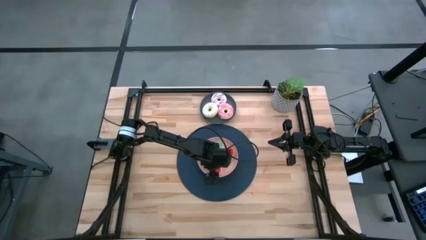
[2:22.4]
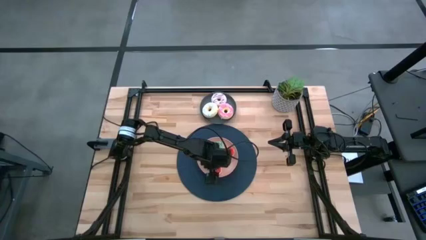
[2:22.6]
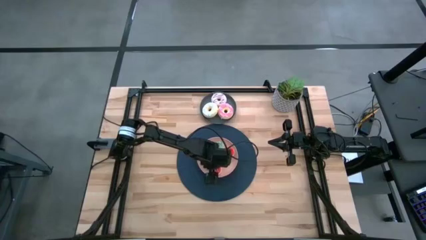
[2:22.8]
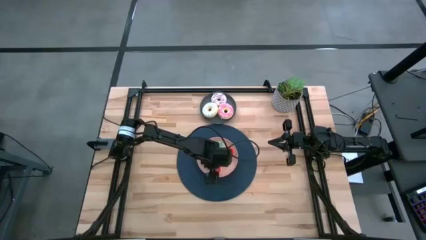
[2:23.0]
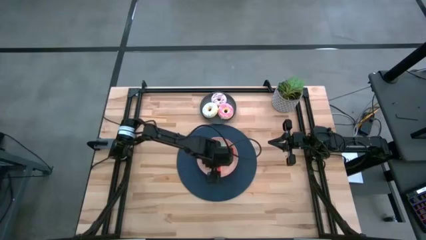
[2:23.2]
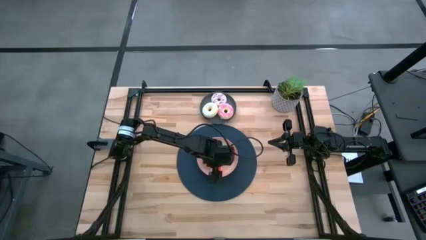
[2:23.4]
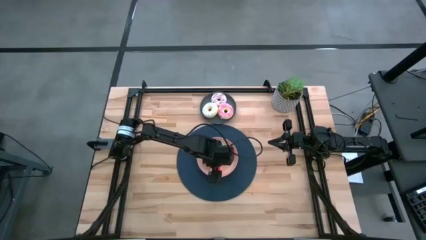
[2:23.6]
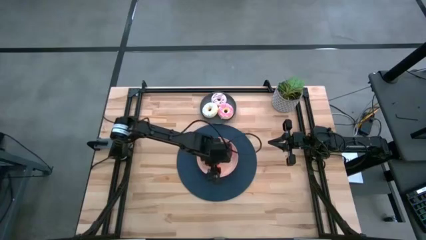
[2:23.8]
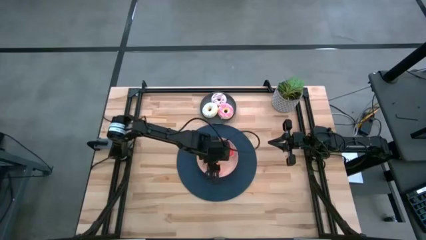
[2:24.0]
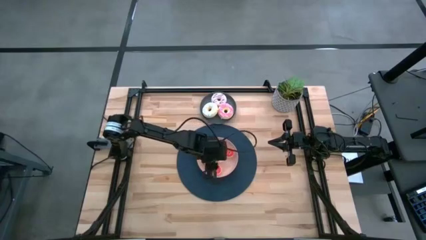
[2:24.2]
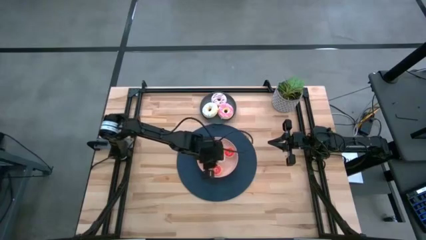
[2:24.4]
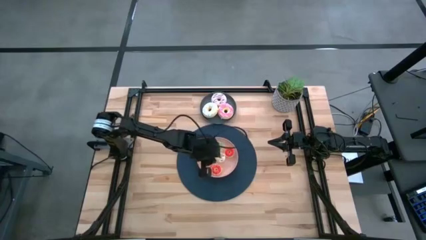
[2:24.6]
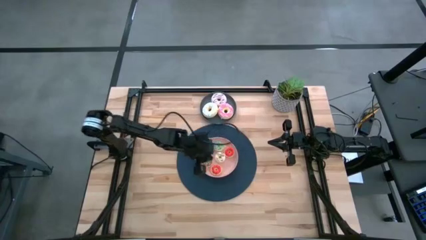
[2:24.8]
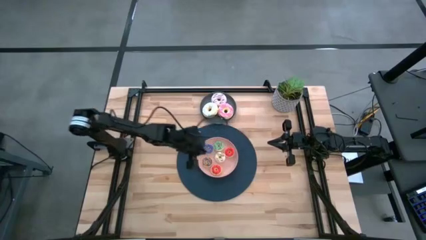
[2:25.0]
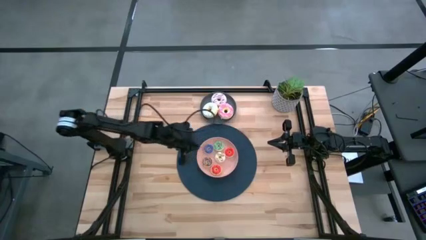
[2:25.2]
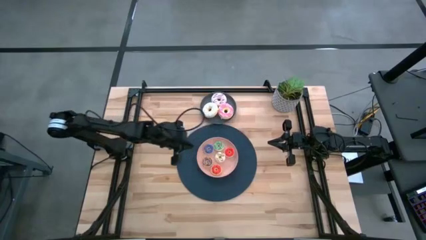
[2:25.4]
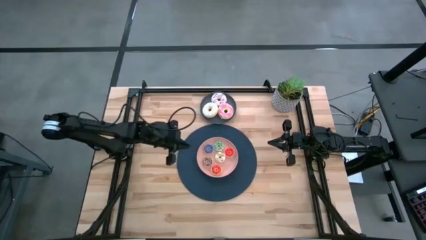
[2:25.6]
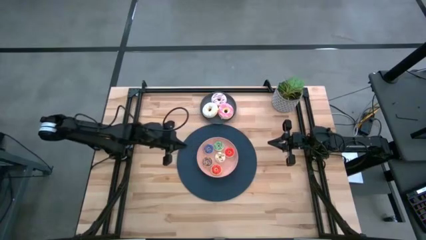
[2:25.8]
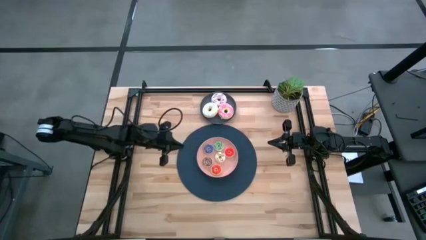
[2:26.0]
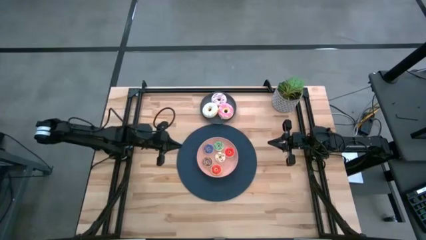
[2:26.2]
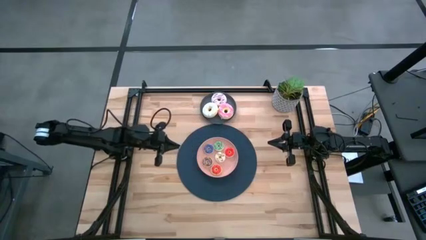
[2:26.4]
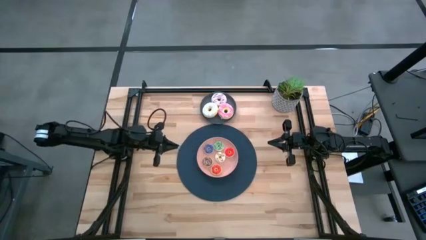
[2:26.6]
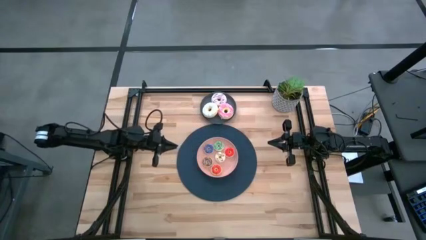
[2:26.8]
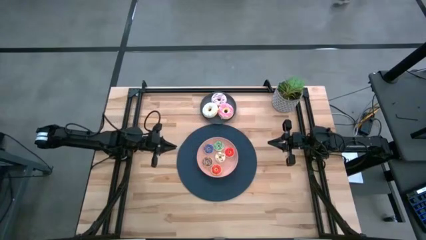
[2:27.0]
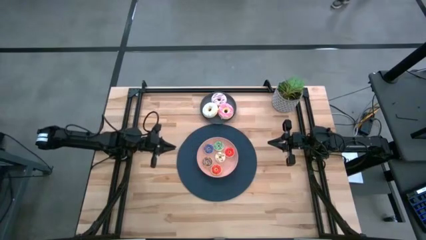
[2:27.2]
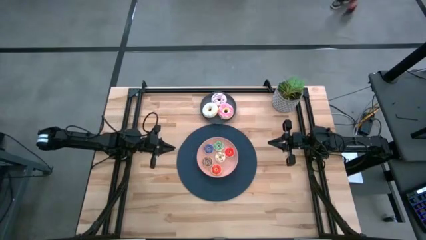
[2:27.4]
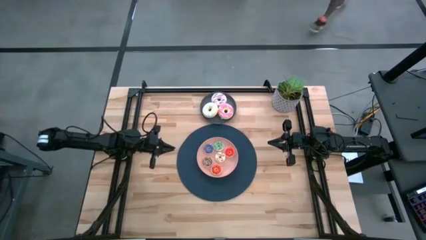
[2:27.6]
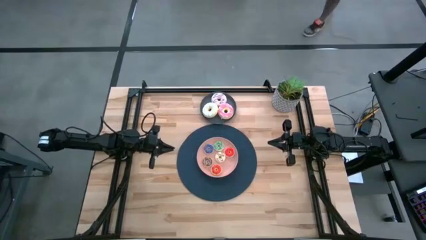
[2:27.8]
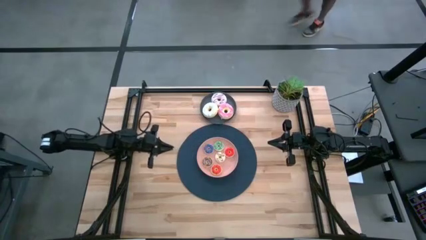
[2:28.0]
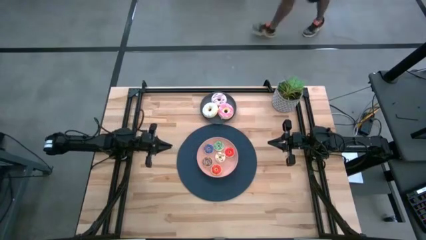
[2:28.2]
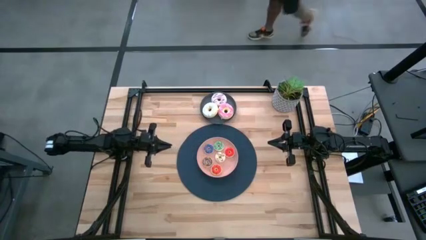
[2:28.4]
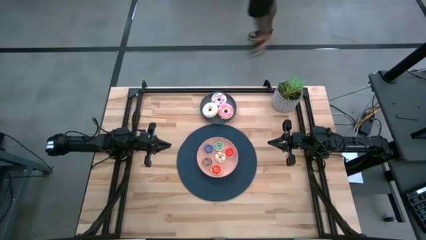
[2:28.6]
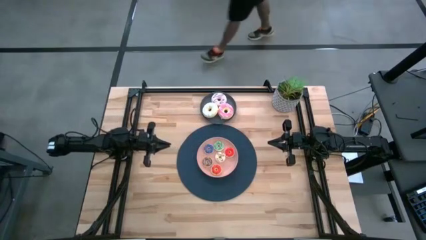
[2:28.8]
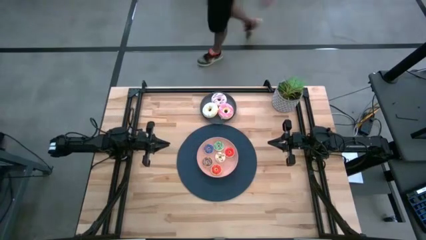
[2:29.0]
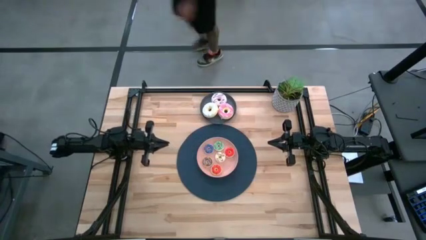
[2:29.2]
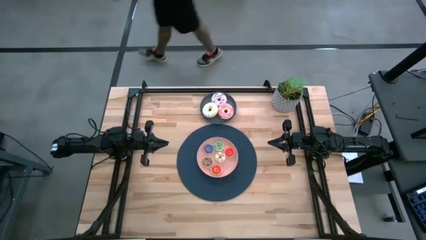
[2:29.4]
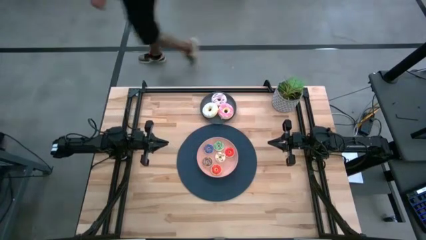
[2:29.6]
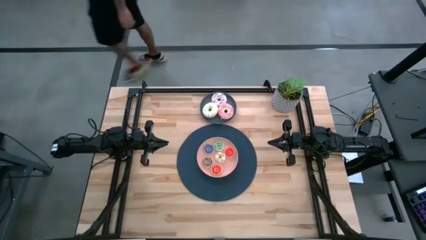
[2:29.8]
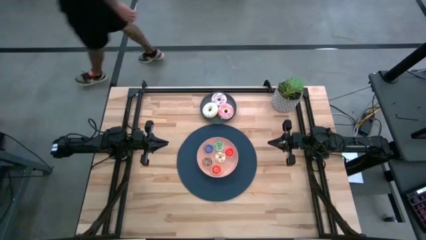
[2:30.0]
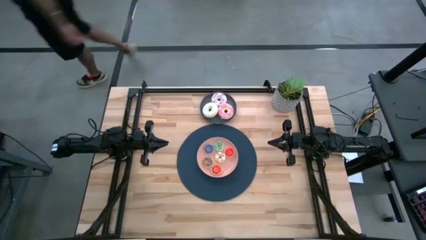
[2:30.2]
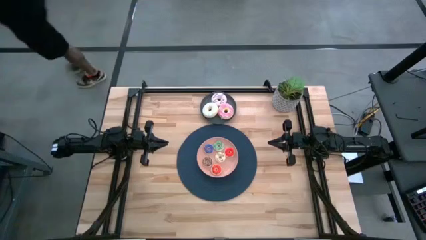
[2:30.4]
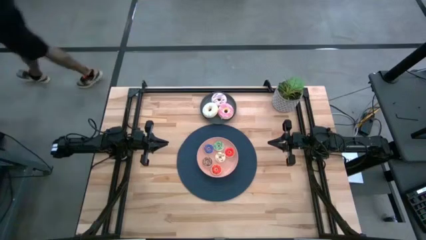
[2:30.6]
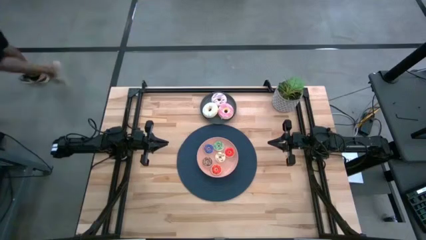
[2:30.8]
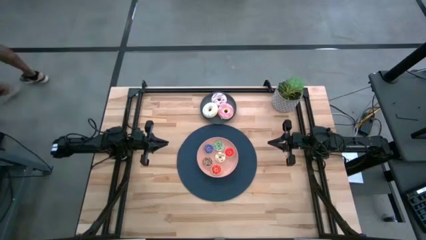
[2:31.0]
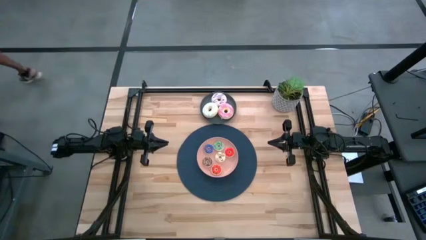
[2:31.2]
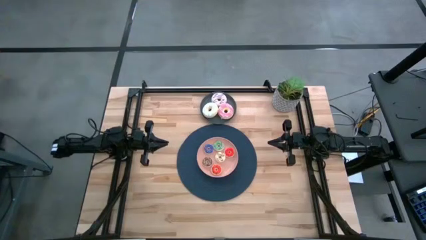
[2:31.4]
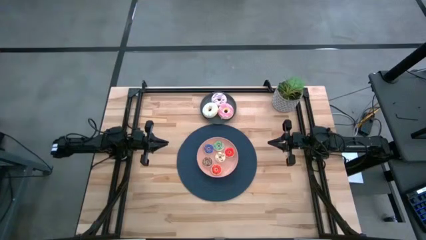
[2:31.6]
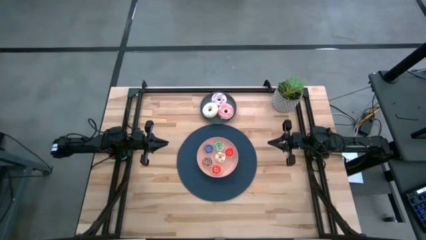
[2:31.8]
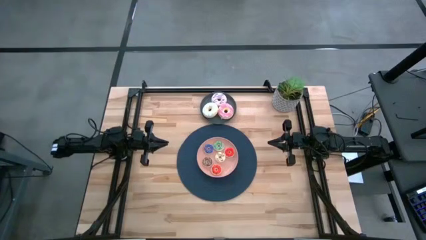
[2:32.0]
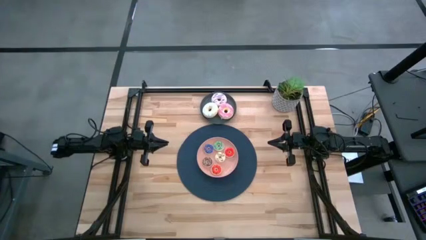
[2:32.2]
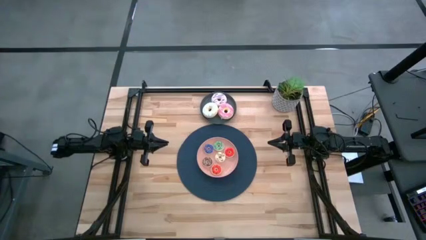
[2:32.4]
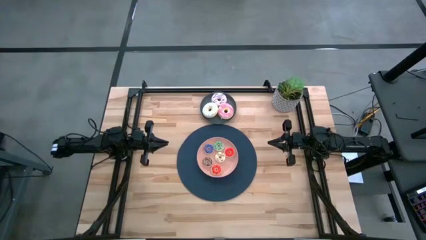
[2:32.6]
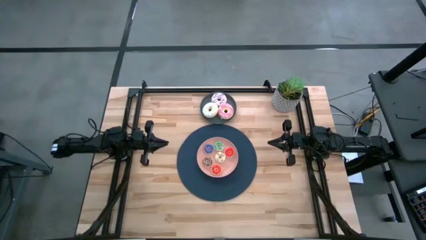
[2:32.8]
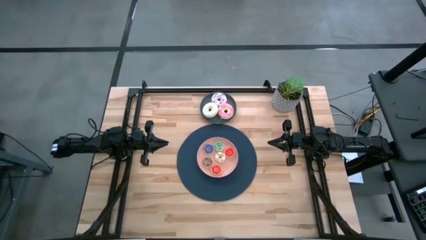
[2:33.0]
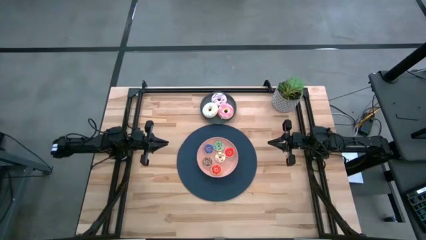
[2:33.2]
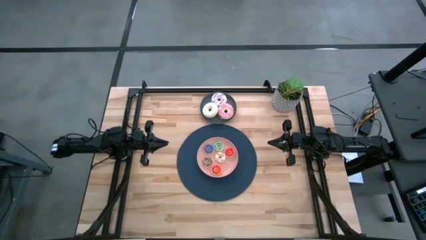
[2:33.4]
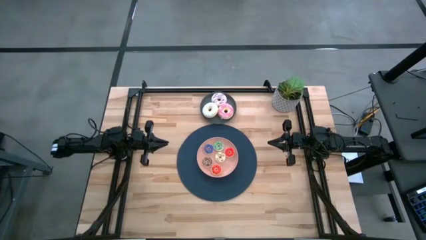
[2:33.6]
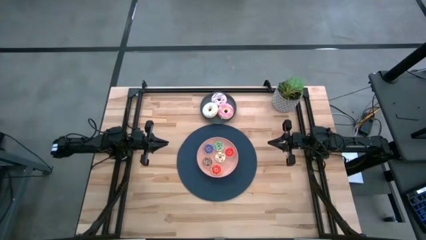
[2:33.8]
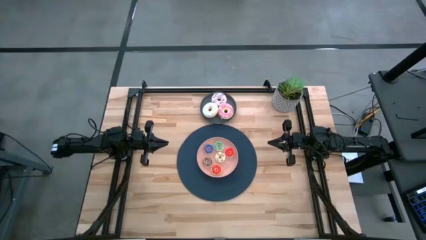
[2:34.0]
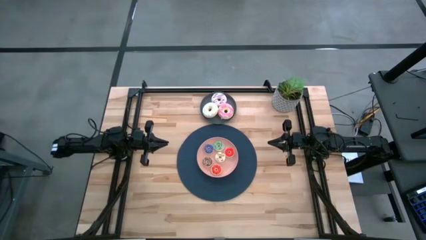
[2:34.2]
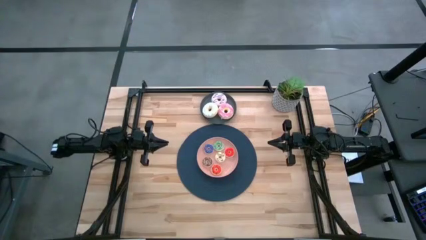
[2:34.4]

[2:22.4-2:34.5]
Task: Pick & Place donuts
Return to Home Position

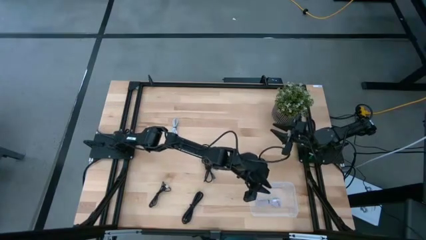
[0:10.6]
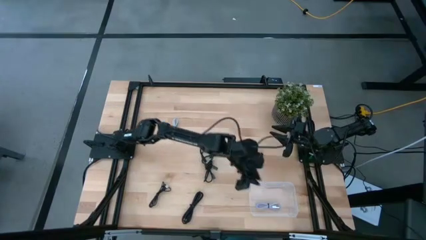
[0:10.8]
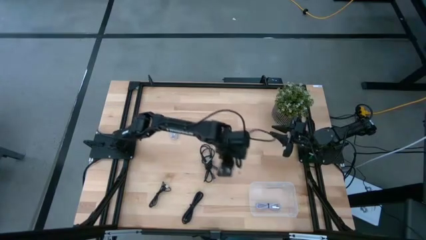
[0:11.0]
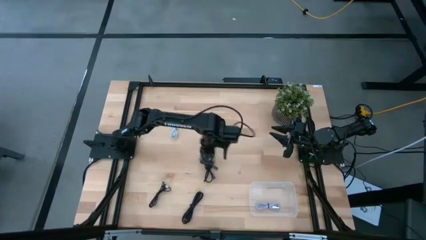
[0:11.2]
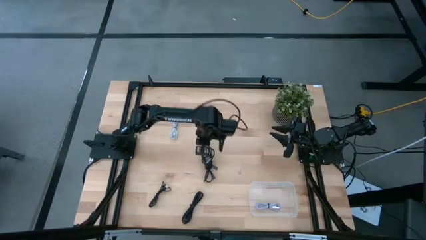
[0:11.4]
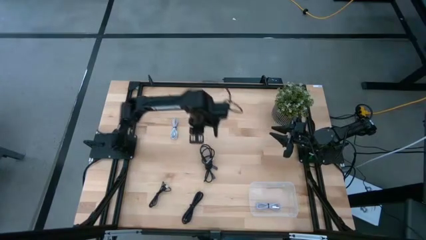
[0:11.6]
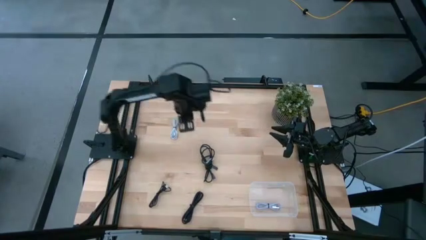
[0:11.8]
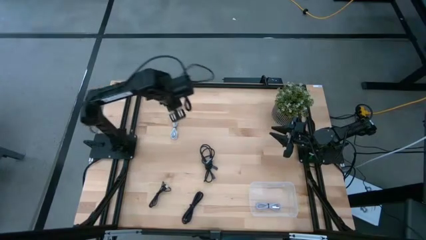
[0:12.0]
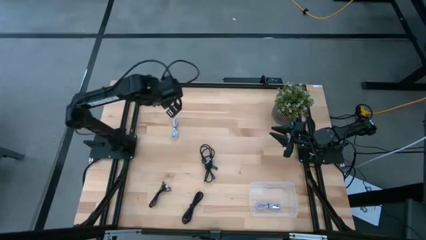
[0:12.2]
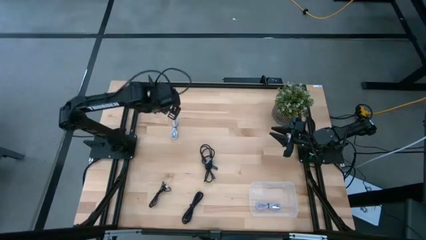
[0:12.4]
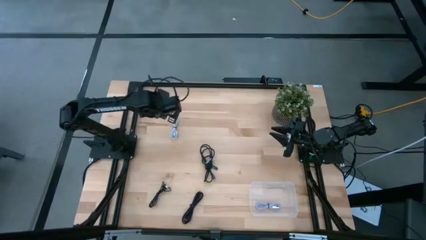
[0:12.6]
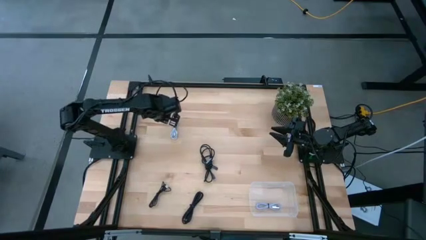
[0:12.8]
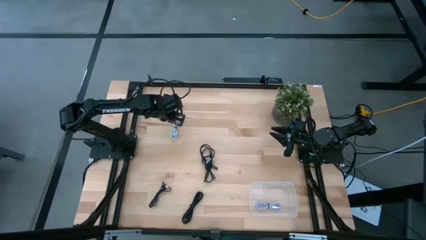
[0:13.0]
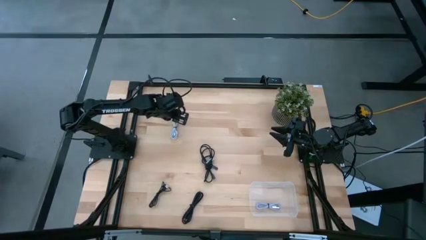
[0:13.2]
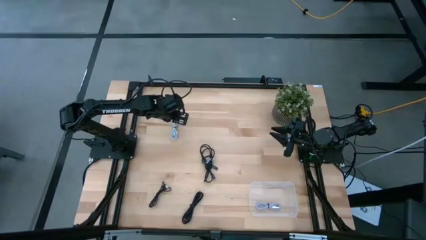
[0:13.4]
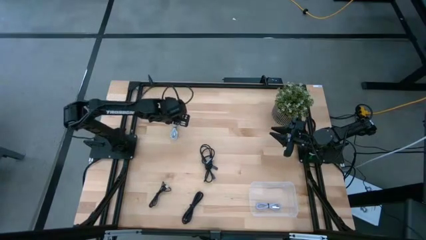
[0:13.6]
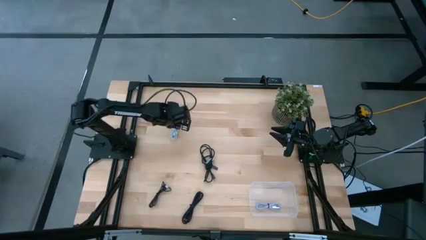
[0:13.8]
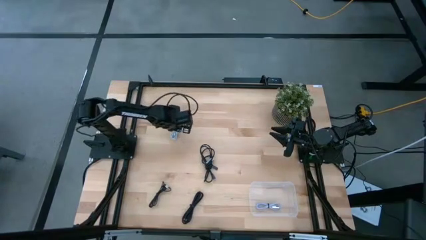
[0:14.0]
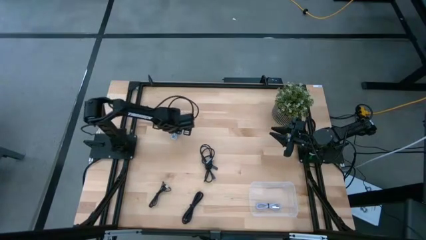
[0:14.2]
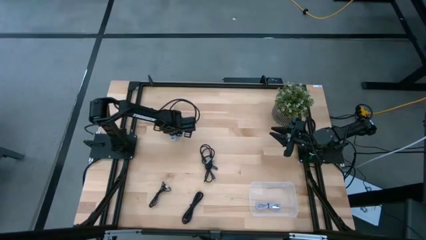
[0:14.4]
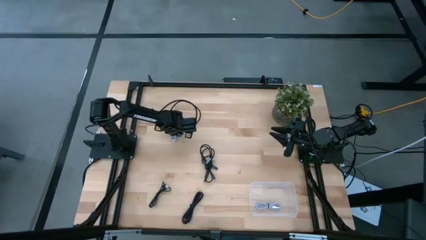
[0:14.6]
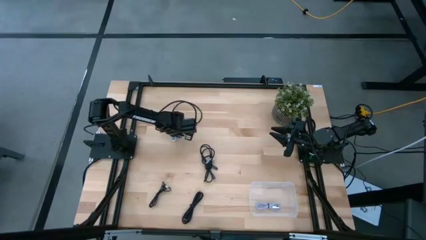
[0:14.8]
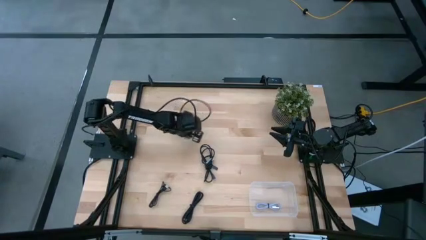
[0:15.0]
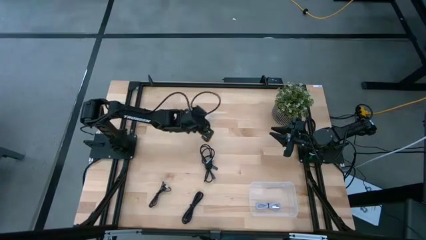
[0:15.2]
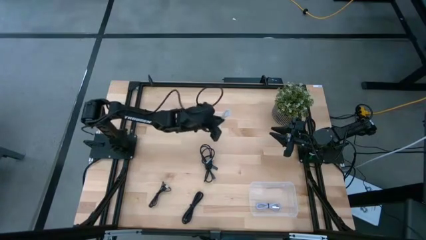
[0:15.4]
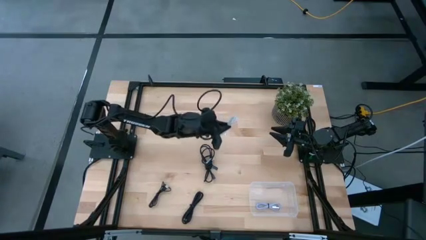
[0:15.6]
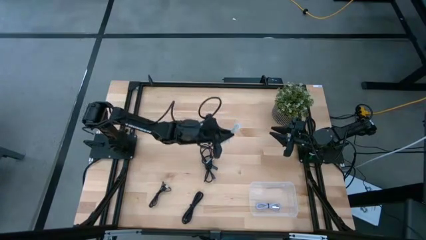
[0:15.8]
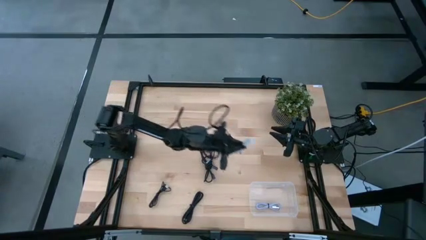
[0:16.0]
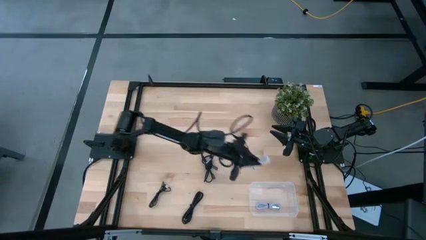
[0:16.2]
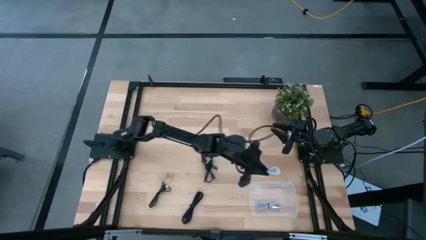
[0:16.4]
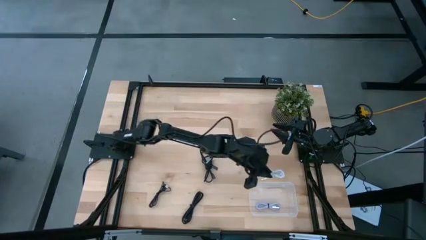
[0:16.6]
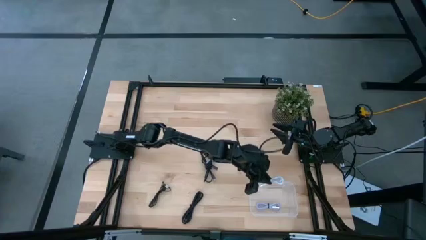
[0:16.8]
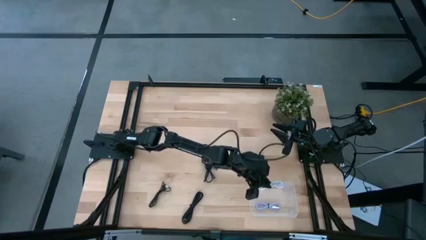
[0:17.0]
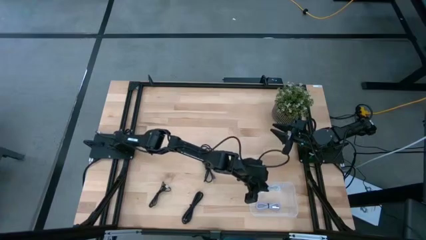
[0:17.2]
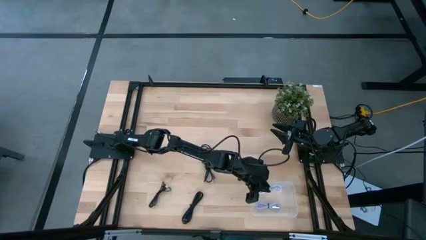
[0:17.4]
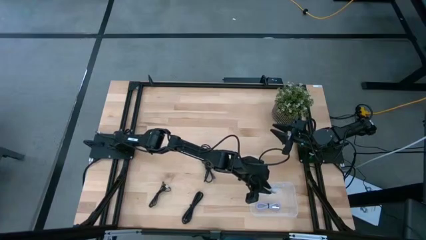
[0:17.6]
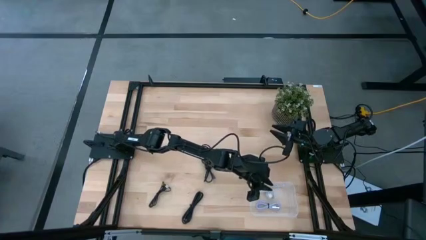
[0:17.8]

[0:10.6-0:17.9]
Task: Pick and place USB-C Cables
Put the white charger cable into the transparent bin
